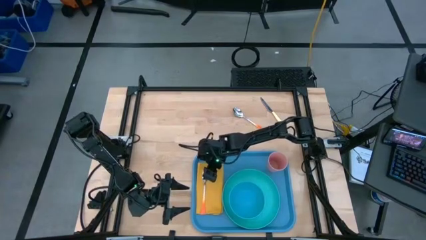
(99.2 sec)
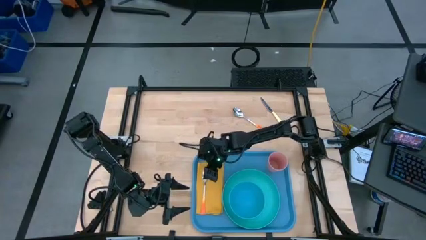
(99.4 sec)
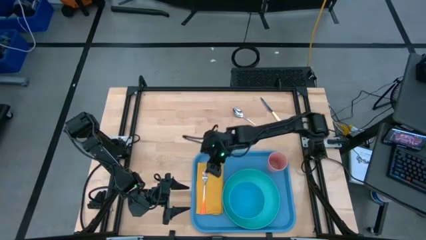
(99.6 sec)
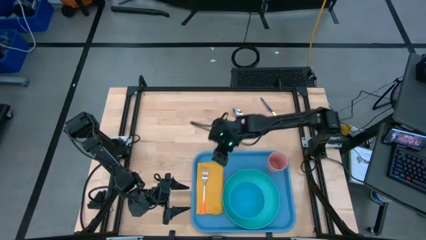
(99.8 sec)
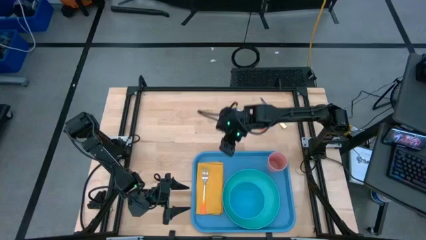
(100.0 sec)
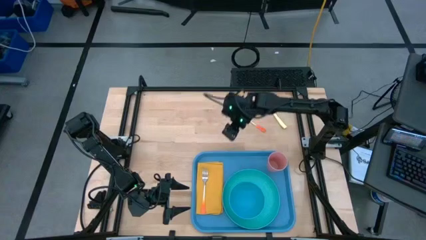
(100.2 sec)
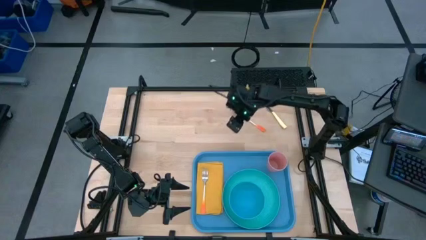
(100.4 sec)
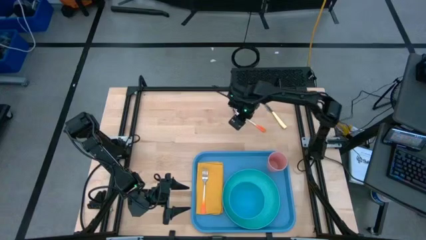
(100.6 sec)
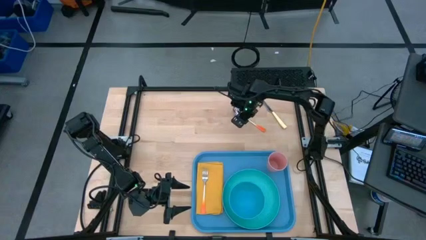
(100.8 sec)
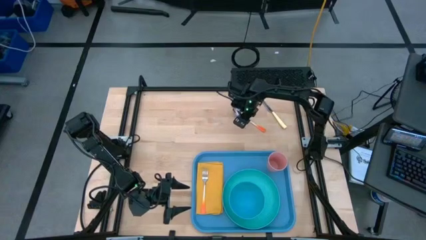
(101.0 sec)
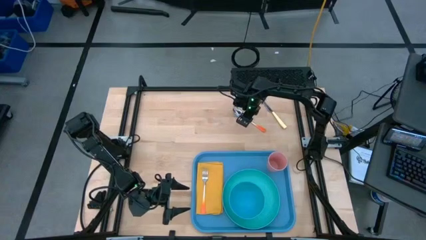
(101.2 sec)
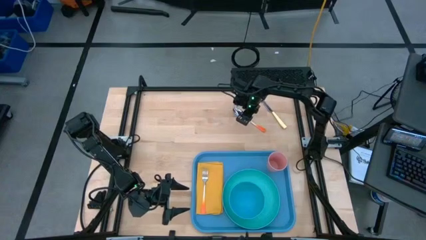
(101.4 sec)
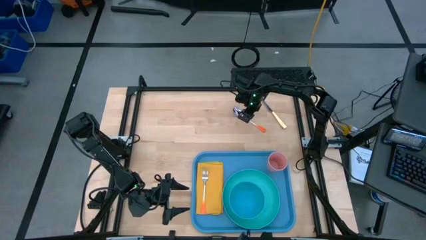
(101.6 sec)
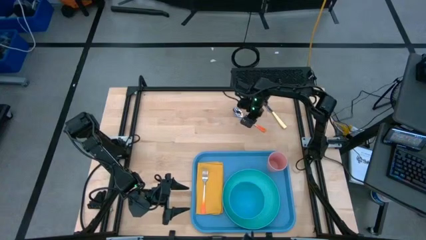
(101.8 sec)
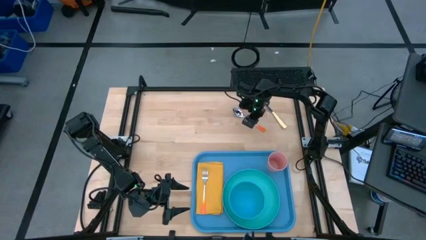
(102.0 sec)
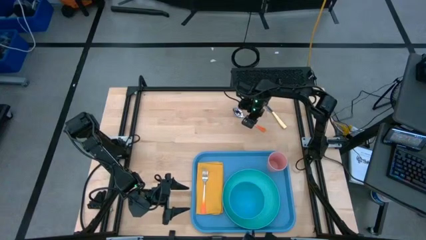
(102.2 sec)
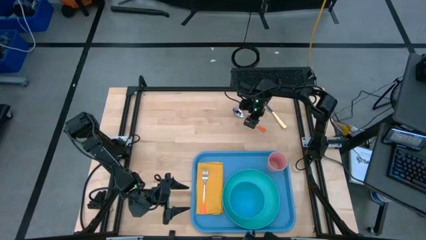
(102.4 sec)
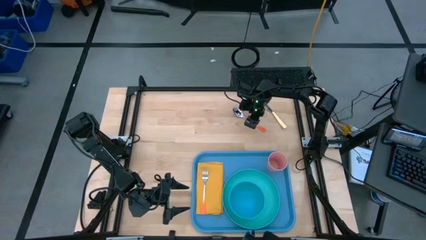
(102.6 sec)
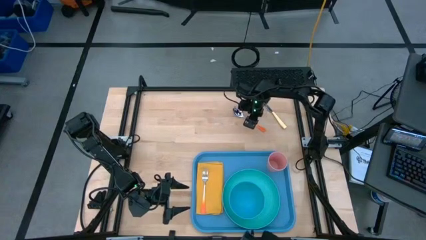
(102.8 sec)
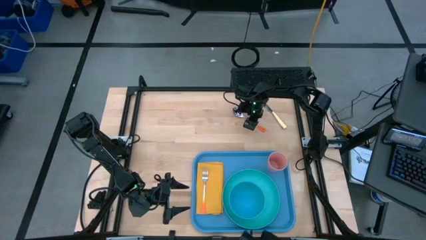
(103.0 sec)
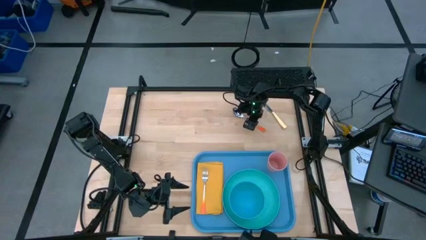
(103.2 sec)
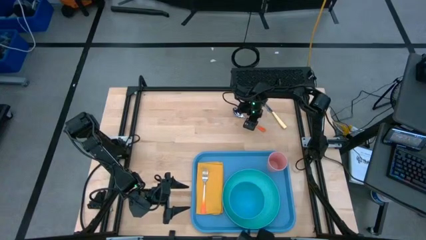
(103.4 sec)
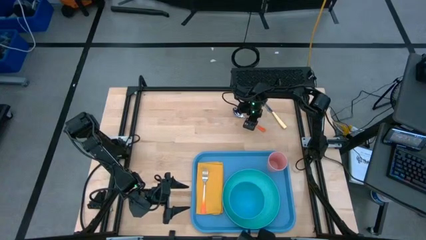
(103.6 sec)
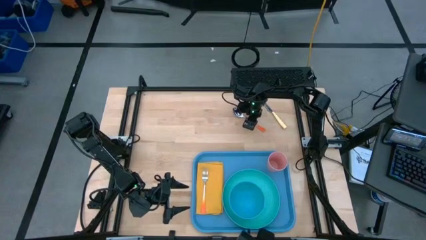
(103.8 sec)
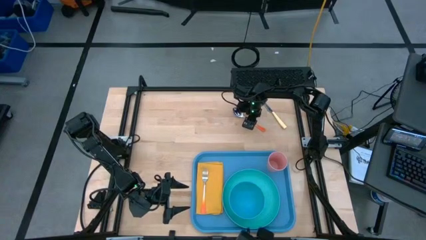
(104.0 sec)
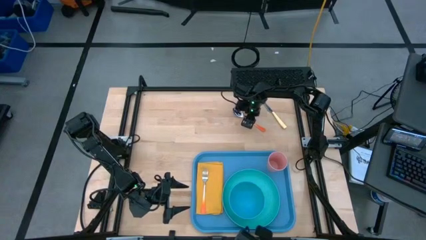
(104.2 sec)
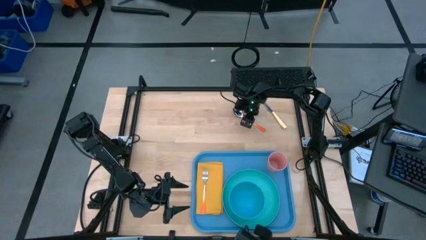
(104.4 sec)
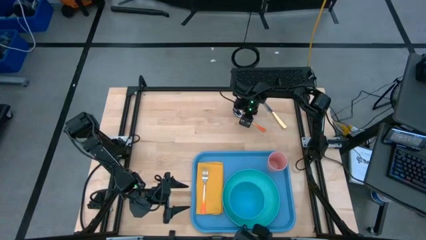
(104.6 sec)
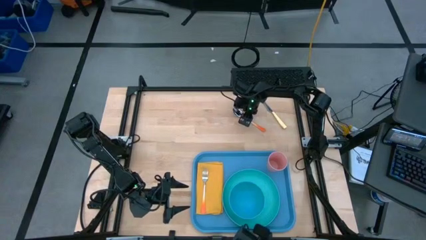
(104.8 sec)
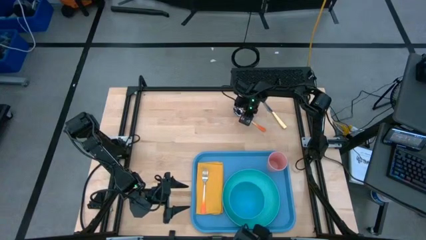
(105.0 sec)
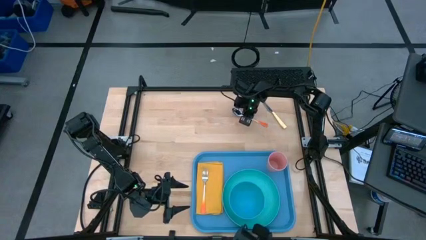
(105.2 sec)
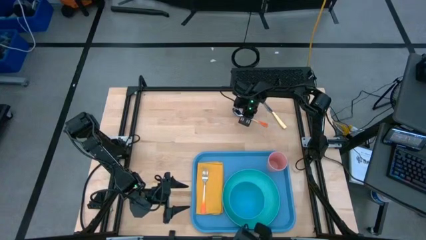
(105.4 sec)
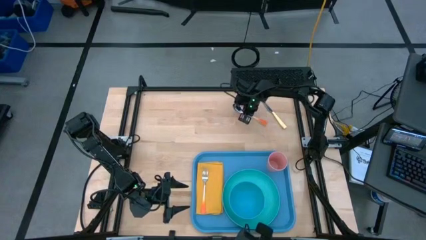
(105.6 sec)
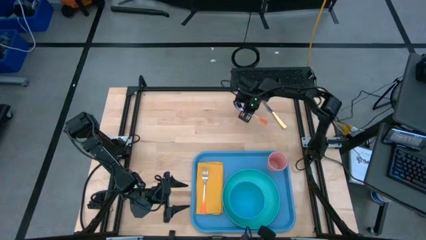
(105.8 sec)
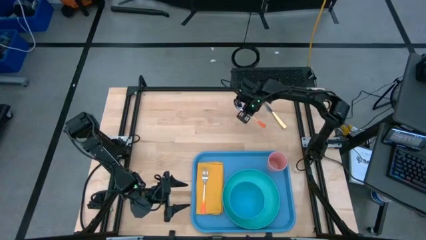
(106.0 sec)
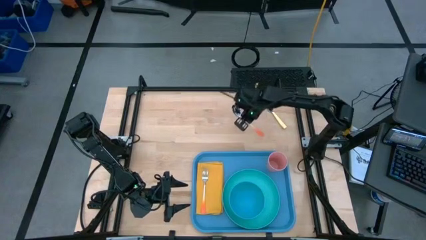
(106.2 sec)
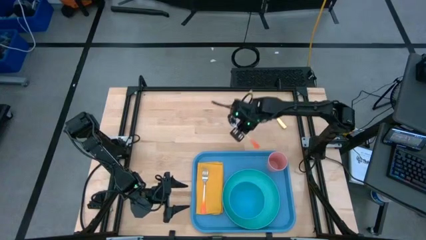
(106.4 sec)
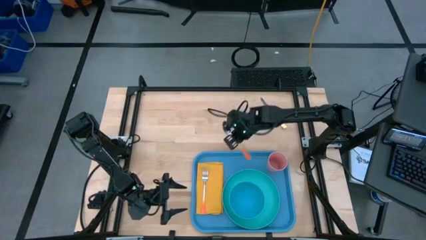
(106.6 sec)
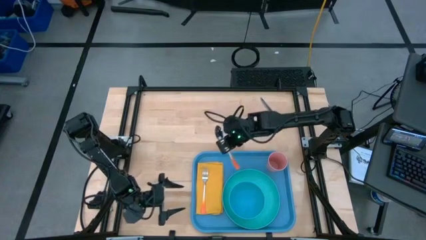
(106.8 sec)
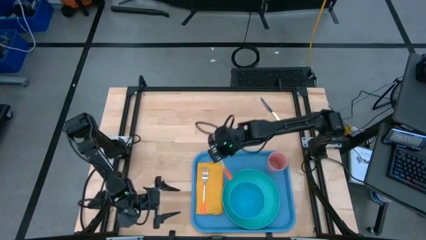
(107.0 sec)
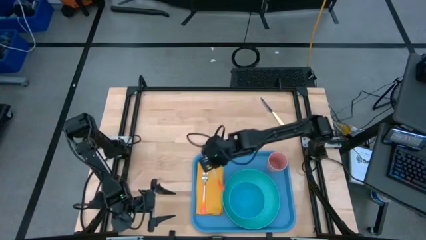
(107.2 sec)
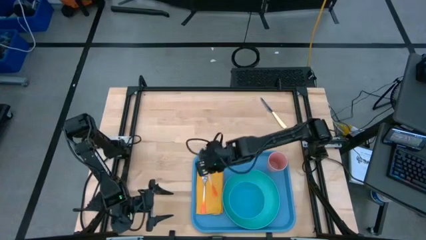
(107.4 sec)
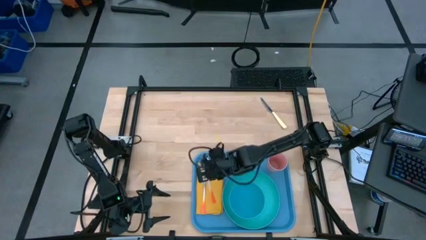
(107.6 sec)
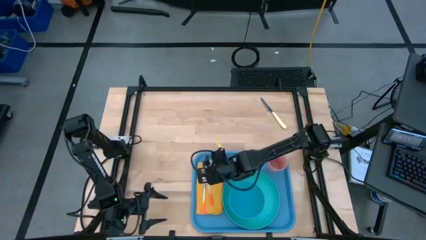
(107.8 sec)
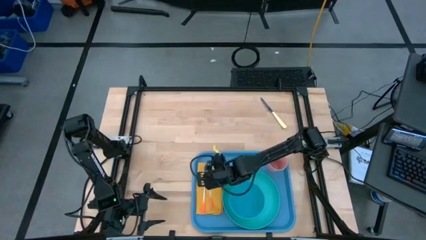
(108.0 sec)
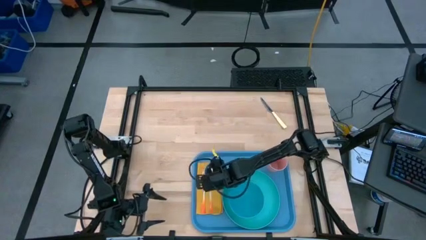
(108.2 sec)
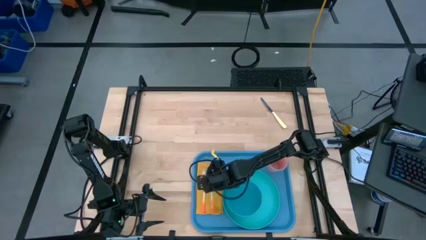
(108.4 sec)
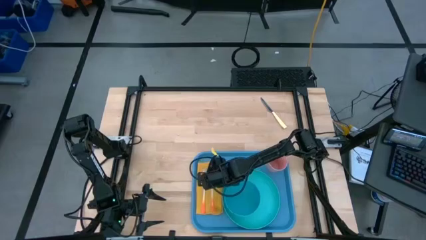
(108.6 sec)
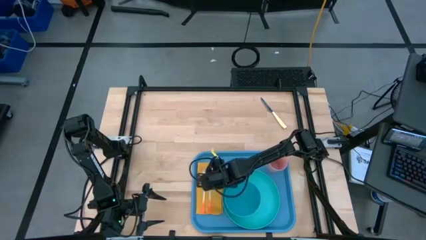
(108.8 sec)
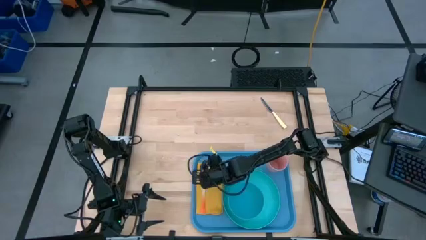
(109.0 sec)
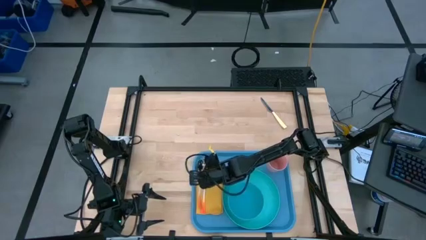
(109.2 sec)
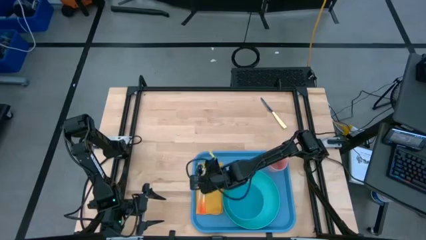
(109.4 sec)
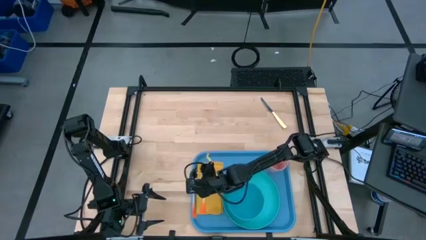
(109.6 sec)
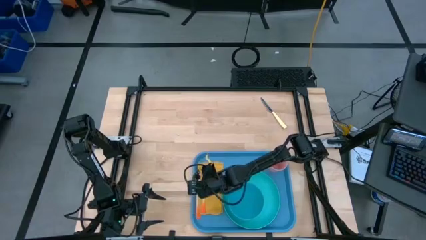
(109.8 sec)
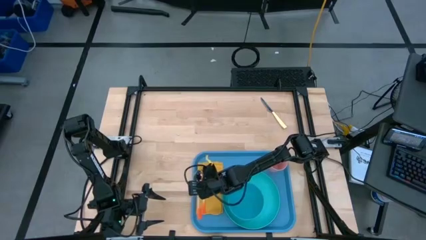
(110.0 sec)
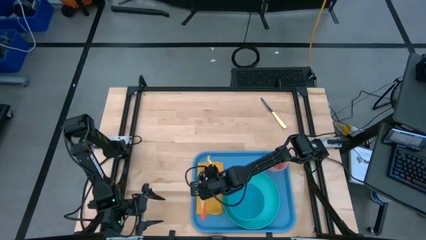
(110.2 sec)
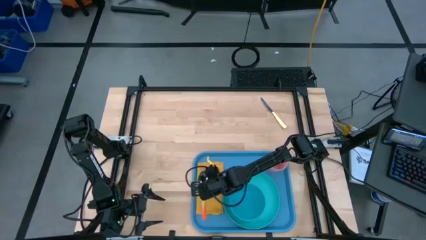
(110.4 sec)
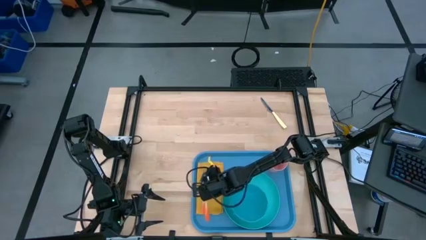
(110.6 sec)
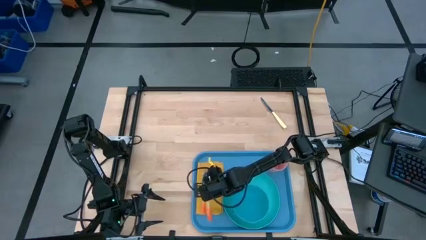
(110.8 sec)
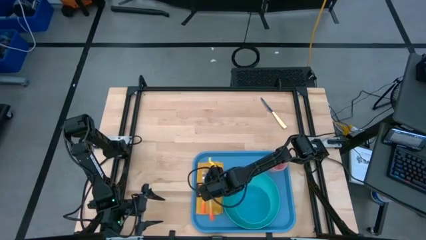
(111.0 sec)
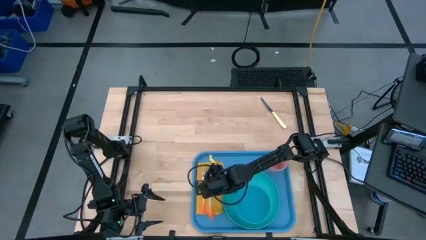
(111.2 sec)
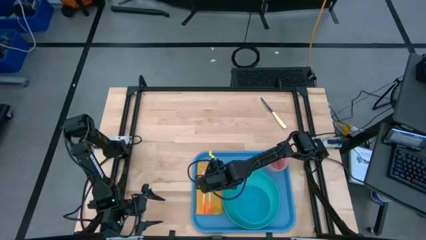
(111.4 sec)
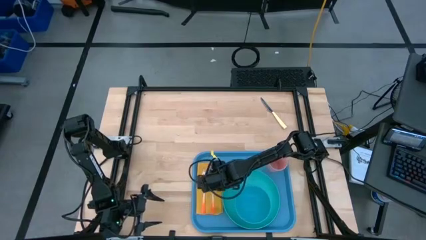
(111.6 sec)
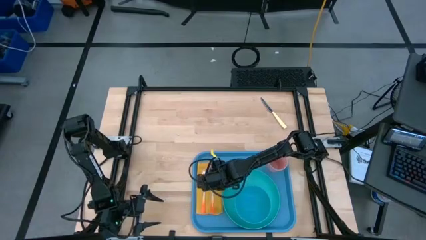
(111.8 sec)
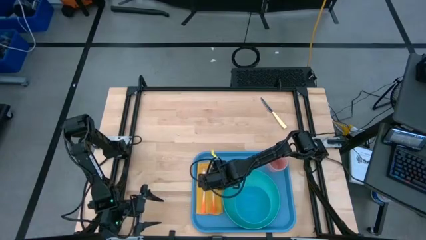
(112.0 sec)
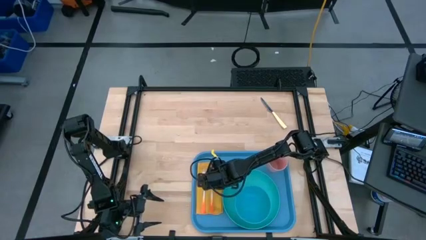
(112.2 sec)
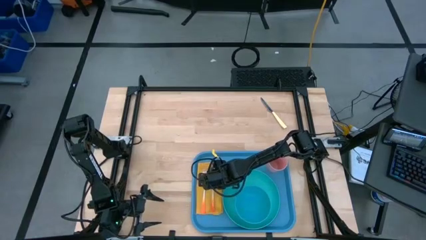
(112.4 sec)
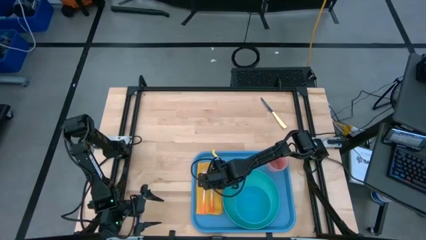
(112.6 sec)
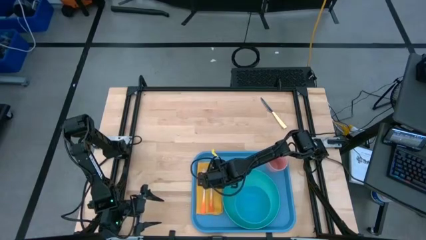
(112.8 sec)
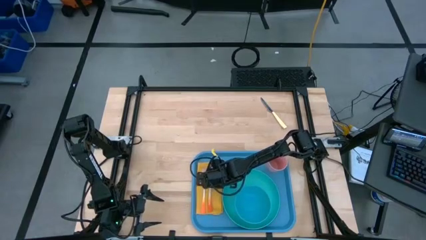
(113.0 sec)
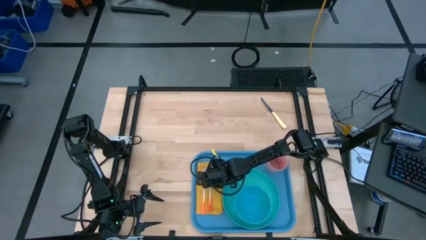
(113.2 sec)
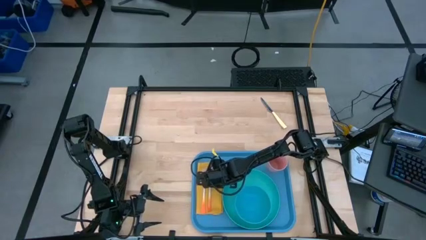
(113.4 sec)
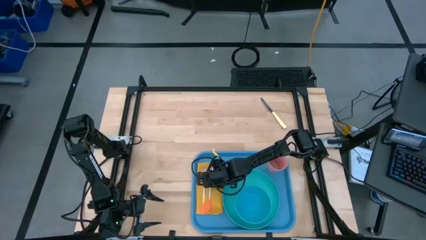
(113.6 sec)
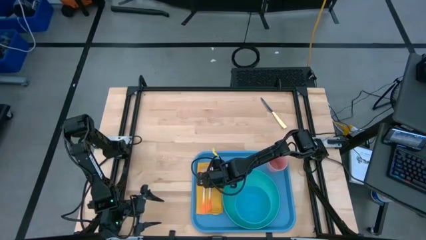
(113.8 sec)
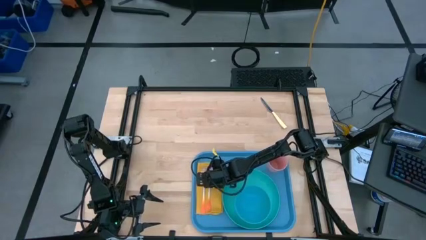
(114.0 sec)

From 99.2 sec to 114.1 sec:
Task: Set up tray
Put the orange spoon on the orange napkin to the right of the orange fork

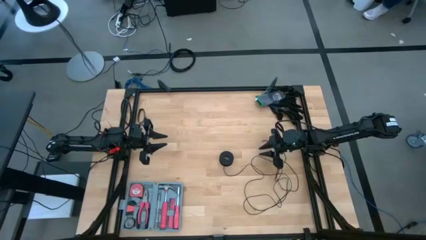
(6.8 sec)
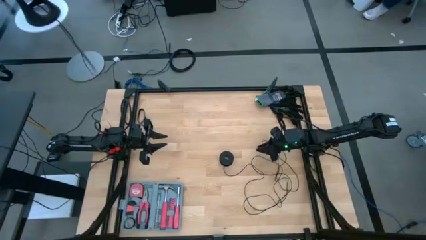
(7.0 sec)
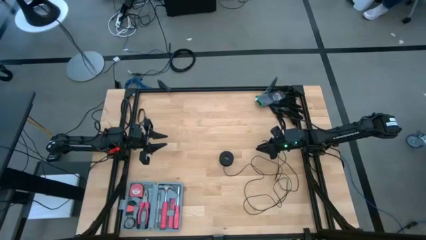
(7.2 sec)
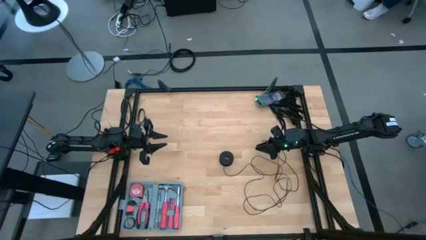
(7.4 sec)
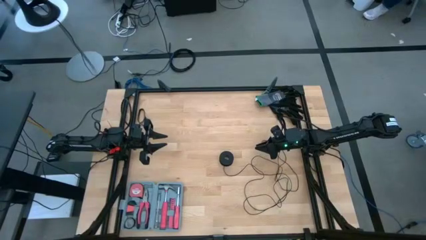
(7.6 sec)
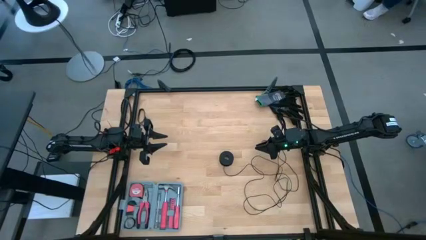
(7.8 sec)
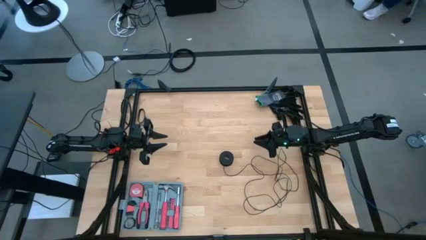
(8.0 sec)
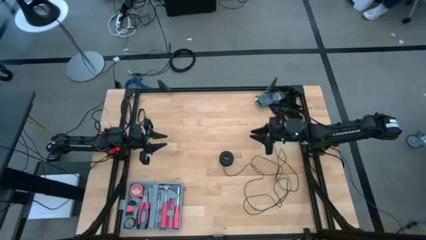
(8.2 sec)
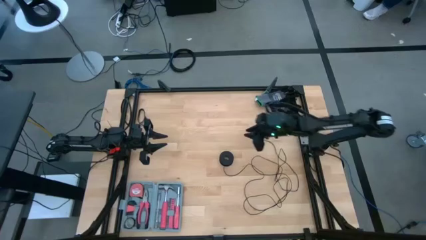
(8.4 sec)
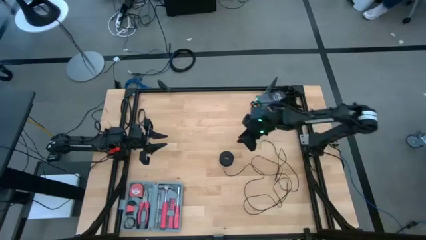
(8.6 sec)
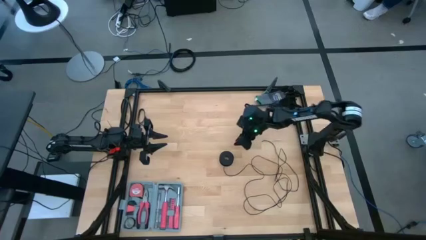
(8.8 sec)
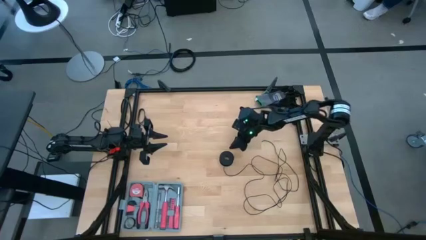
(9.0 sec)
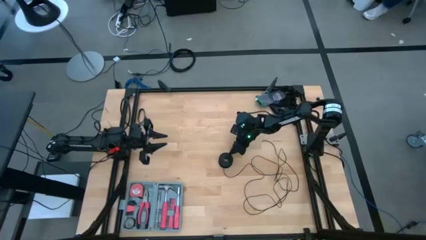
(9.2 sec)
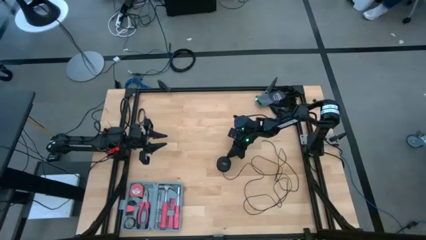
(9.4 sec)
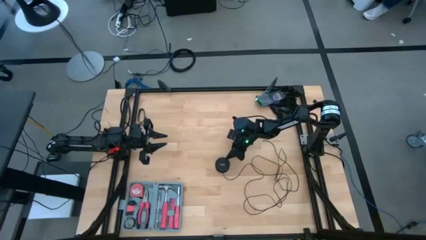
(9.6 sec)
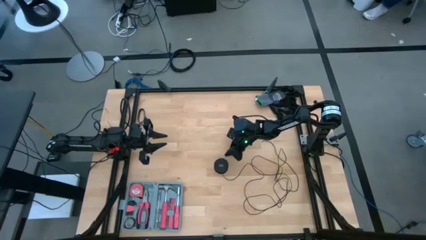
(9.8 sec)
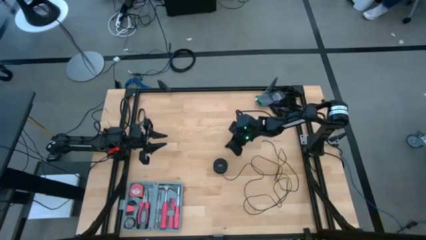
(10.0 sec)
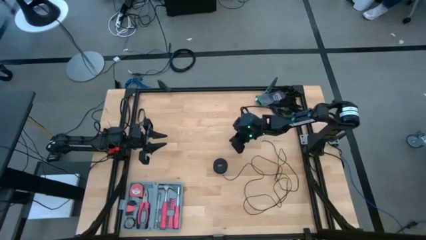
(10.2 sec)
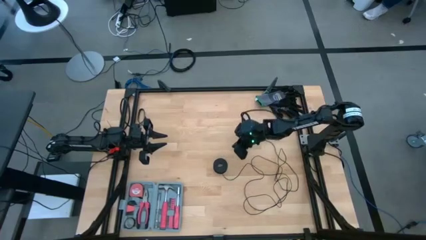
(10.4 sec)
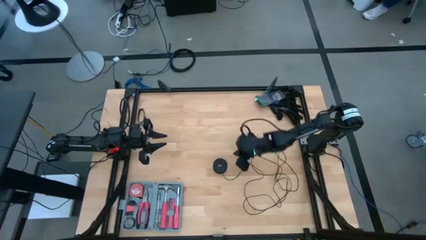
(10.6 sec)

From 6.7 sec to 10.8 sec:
Task: Coil cords
Coil the black wire on the spool
